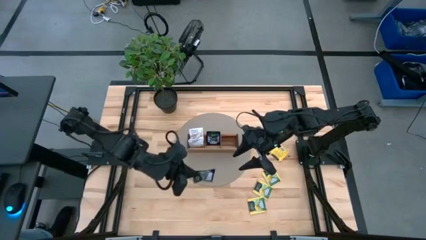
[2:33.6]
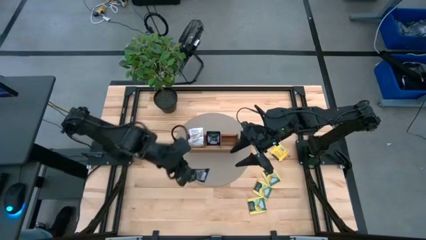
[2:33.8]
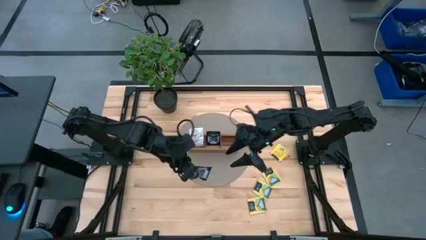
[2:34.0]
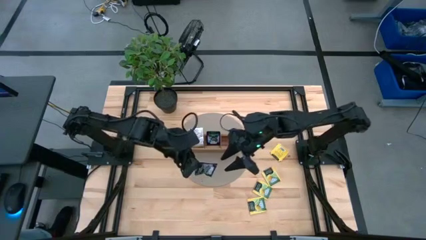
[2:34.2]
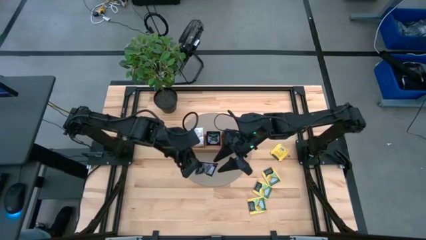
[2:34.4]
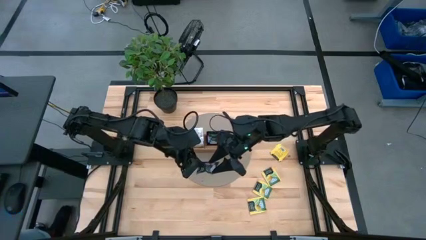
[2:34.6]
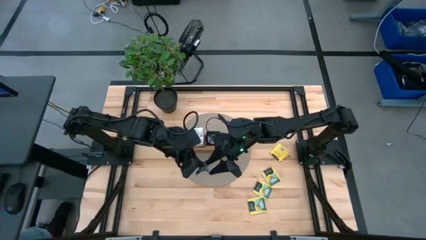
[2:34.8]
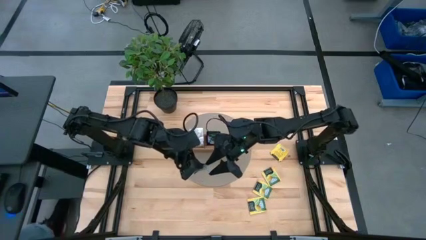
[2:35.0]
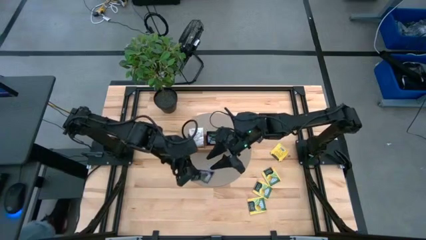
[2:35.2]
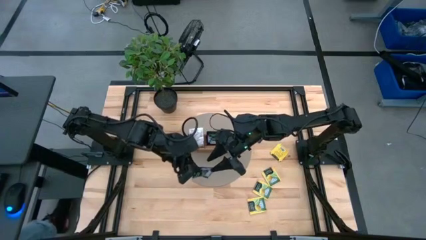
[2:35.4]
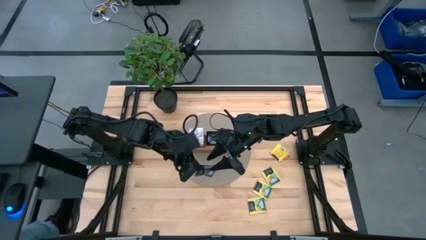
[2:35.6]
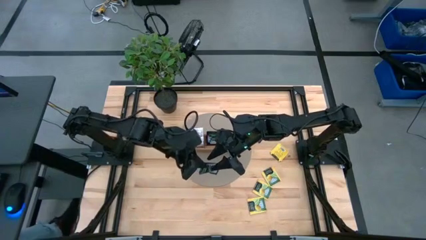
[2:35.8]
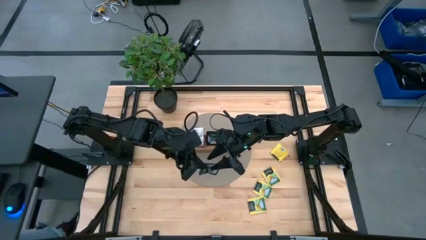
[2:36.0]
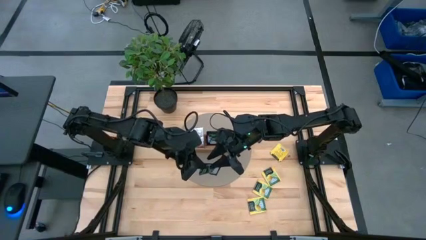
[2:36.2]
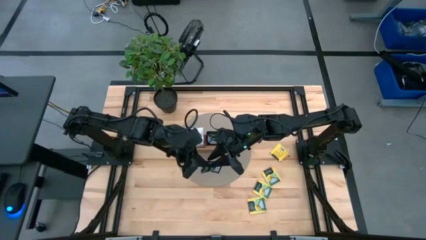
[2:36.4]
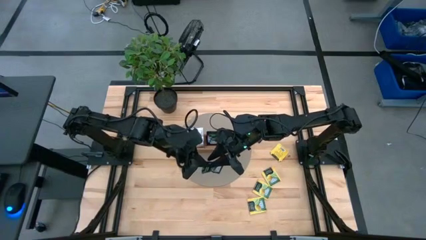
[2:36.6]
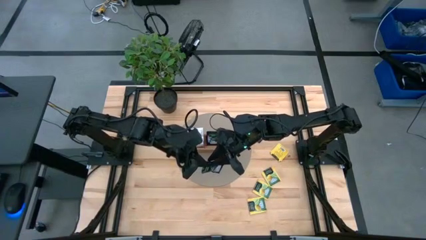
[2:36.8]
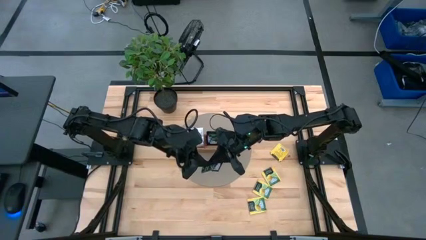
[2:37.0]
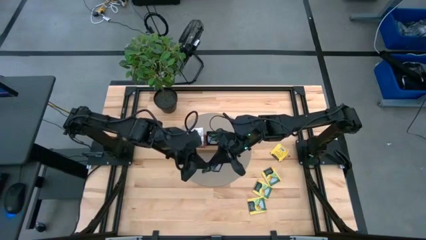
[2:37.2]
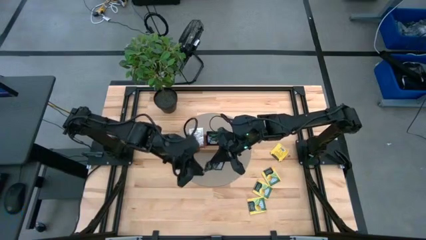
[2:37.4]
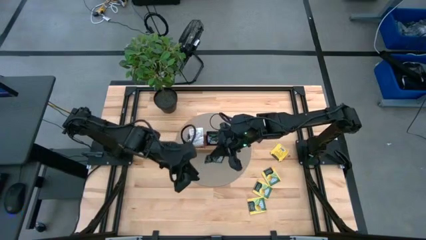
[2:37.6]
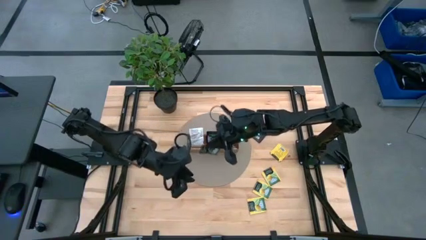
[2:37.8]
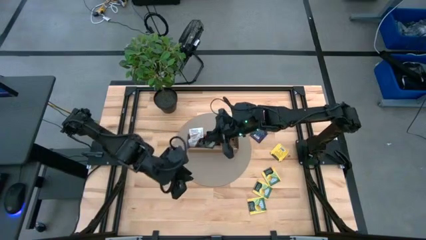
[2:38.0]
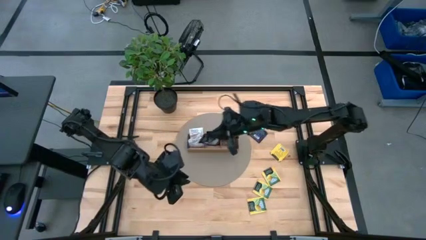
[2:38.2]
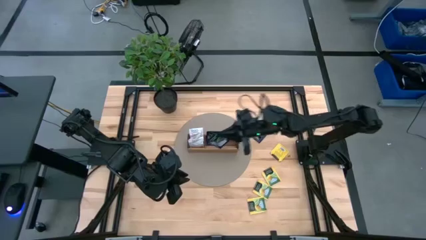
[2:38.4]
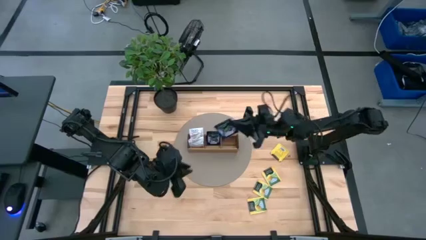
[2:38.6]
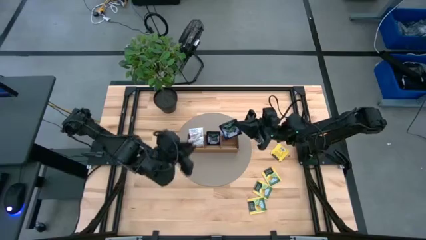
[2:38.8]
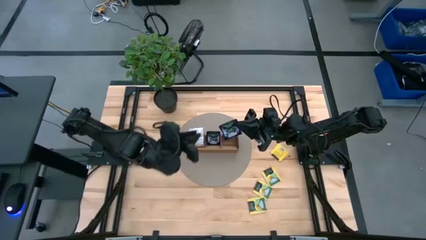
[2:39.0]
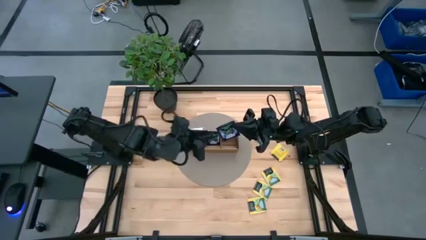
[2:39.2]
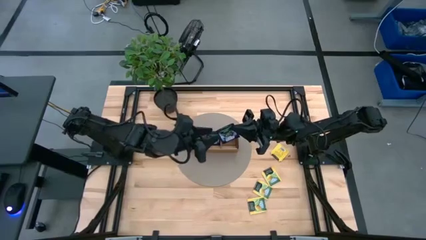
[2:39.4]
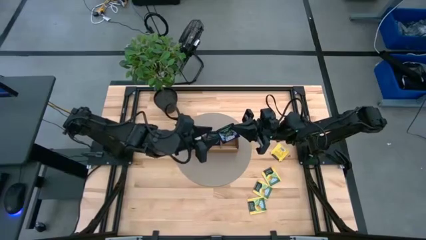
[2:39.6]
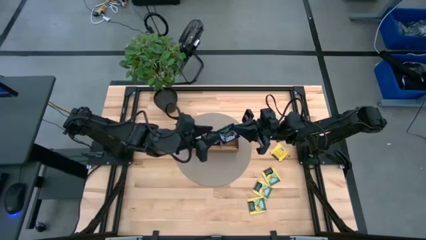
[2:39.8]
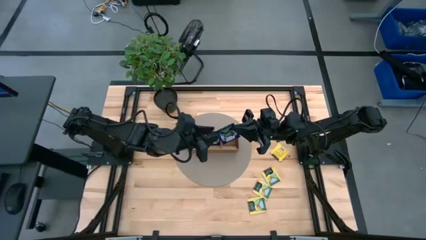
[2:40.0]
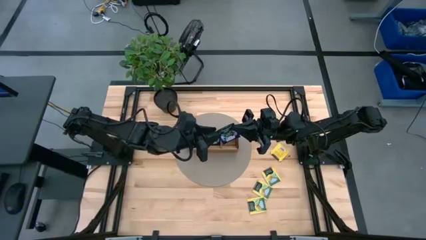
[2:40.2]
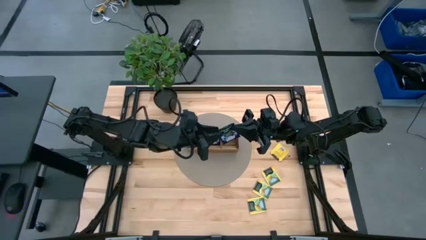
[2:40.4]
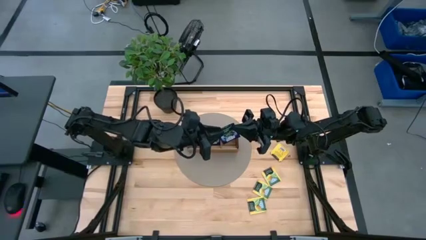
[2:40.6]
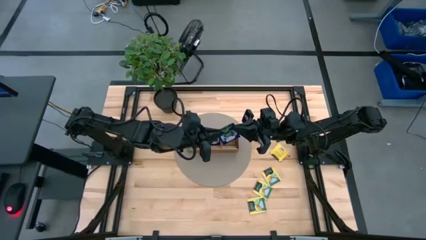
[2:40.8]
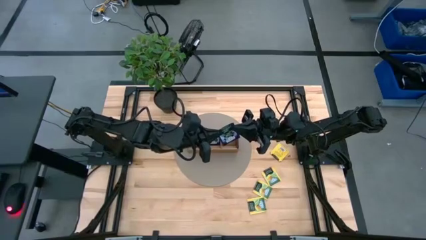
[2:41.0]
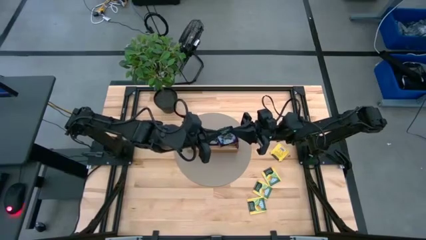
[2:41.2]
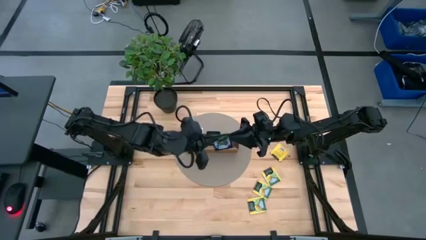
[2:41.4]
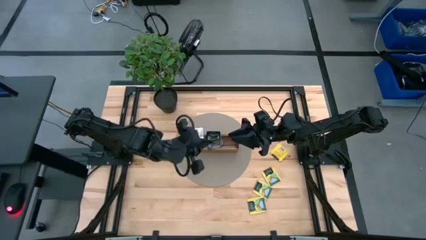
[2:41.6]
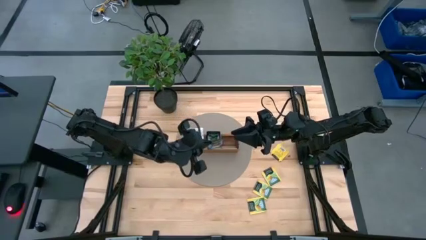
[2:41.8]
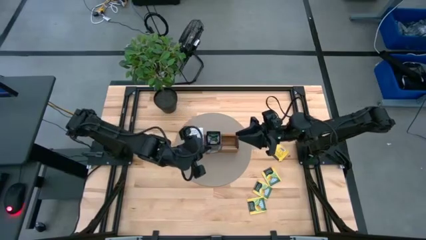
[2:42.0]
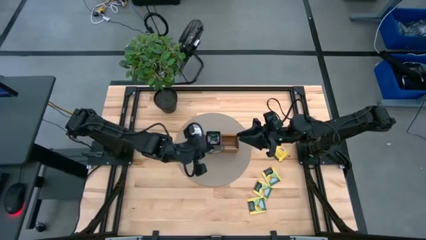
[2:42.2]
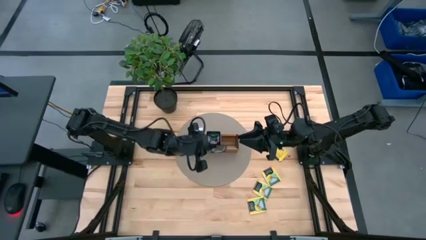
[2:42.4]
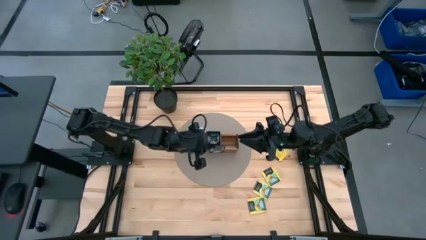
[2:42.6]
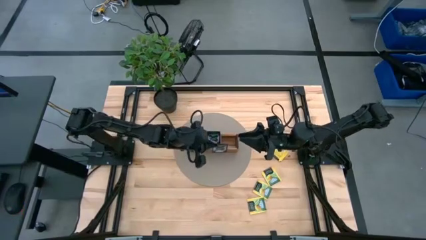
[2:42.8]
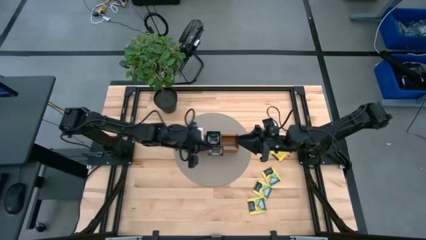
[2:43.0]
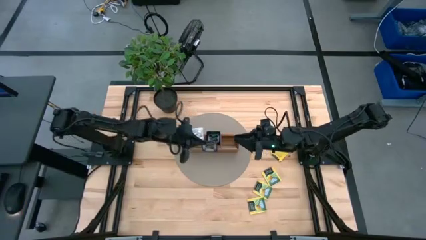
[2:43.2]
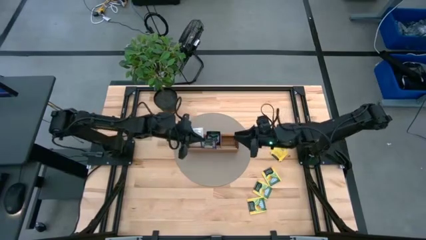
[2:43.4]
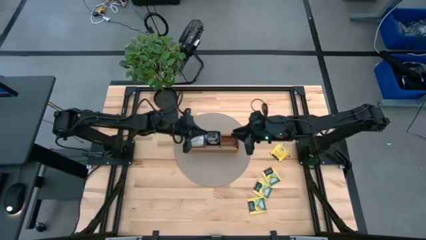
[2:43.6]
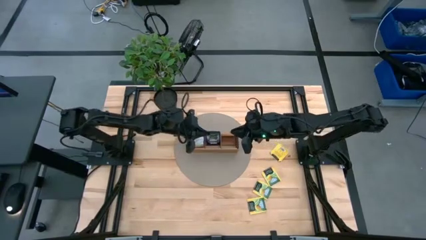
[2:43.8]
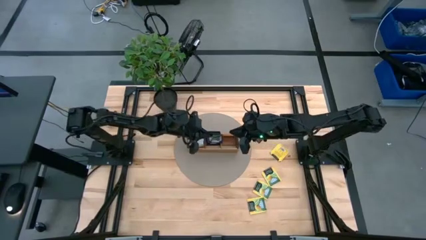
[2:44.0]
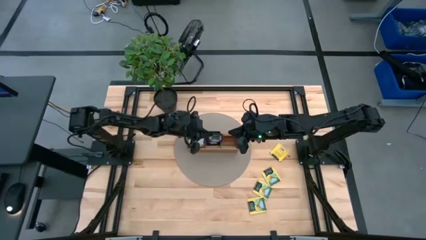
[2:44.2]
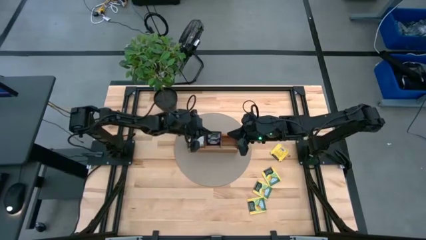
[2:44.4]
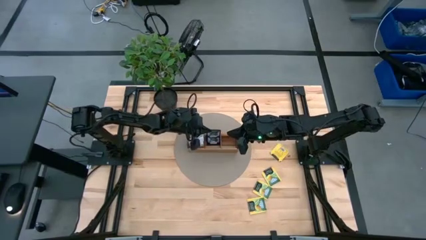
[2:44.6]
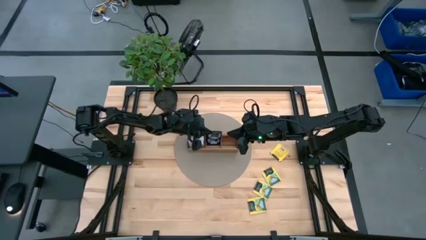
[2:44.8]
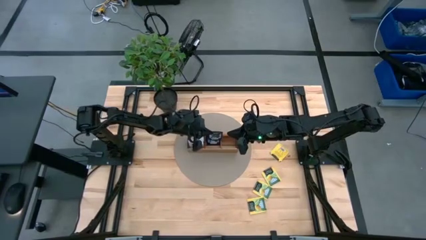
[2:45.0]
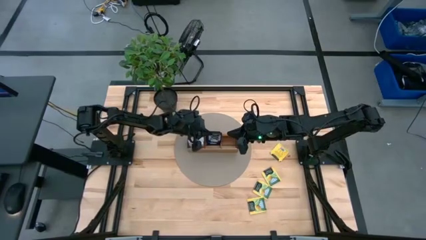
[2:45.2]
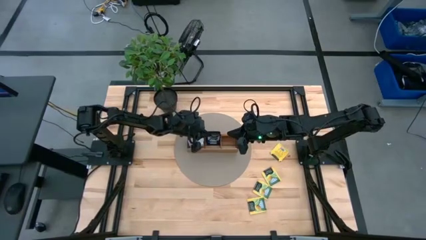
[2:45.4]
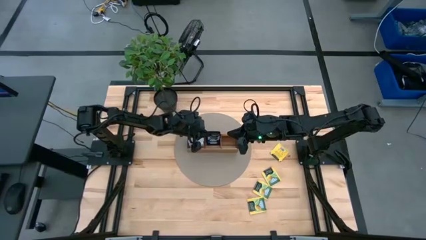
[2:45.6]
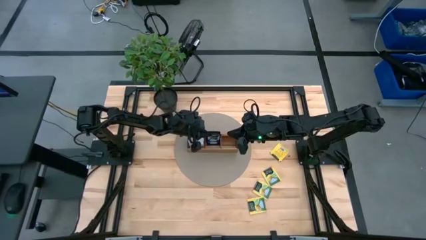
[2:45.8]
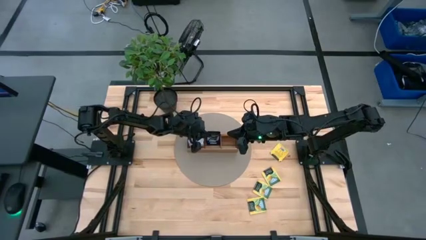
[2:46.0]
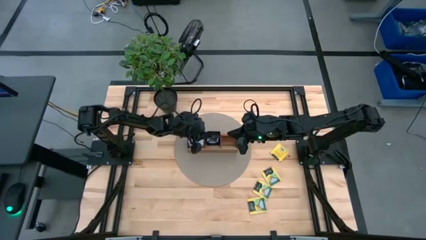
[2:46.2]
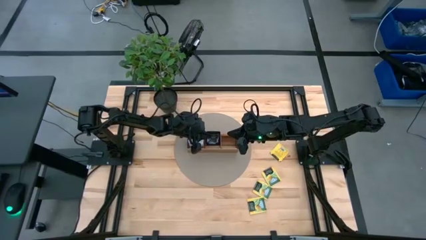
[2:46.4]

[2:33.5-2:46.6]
Task: Pick & Place Tea
Put the blue tea bag into the middle section of the wooden organizer

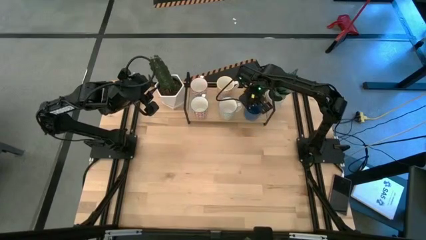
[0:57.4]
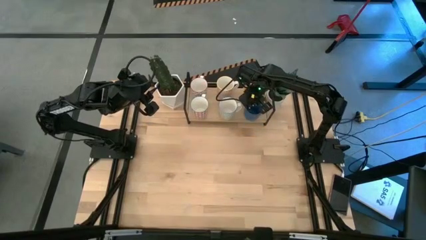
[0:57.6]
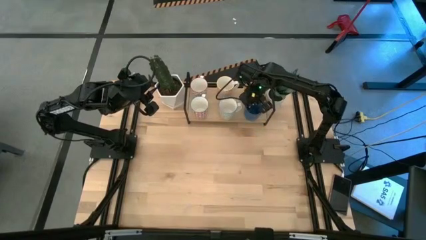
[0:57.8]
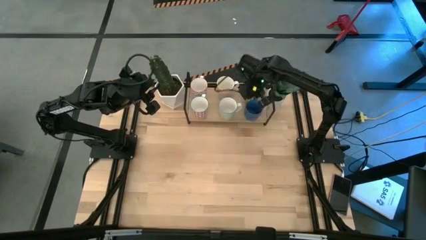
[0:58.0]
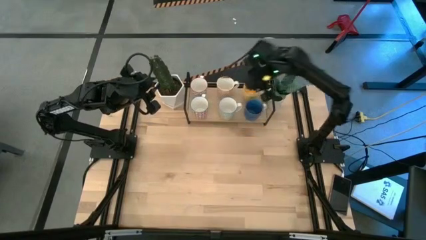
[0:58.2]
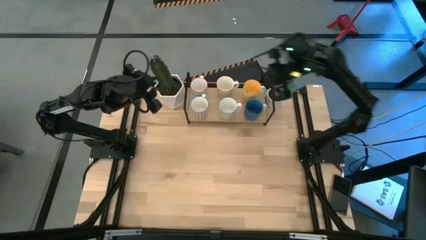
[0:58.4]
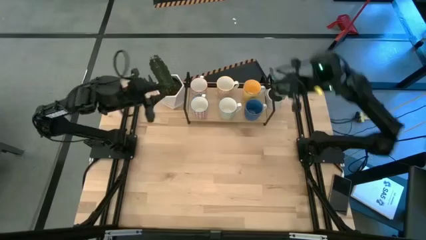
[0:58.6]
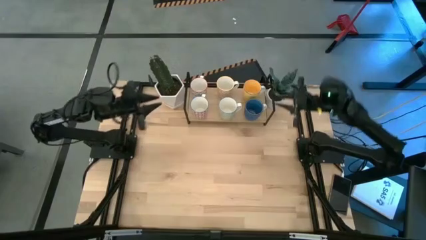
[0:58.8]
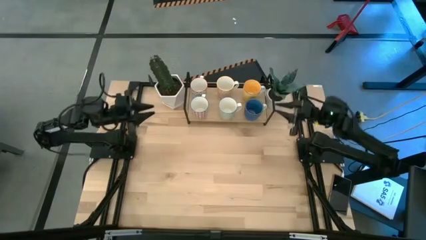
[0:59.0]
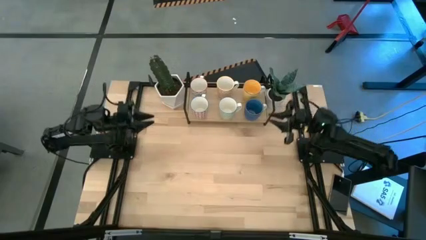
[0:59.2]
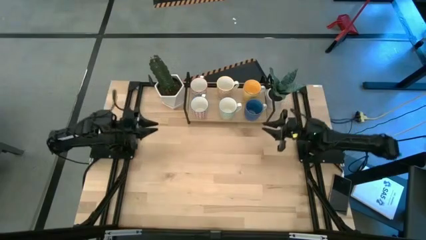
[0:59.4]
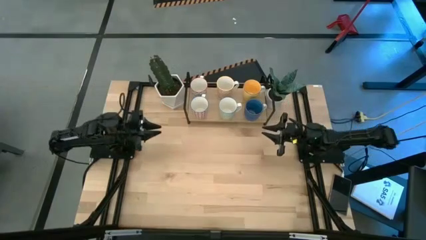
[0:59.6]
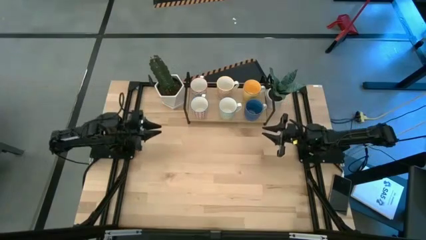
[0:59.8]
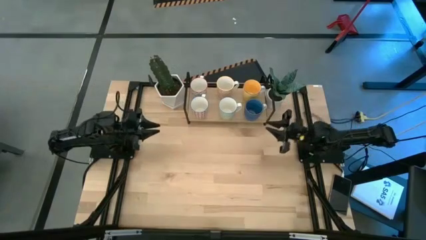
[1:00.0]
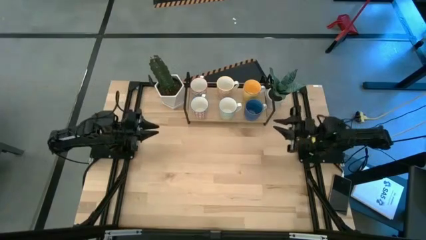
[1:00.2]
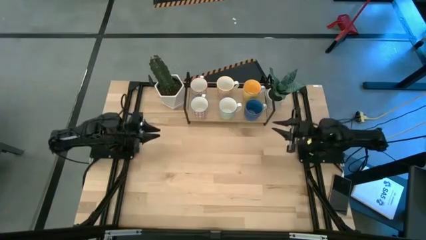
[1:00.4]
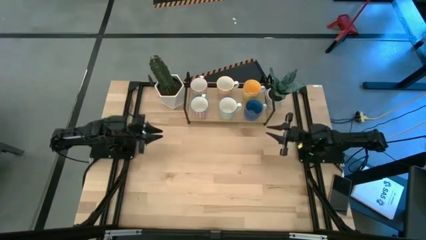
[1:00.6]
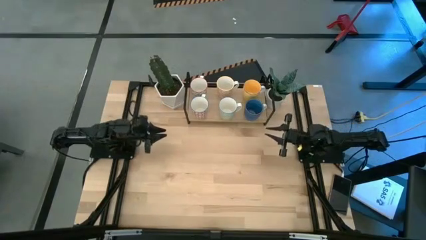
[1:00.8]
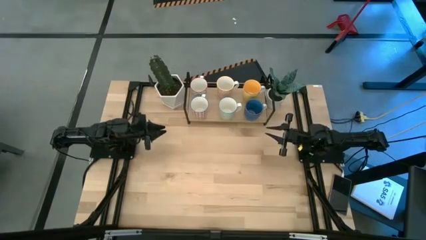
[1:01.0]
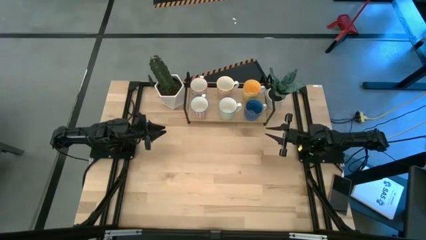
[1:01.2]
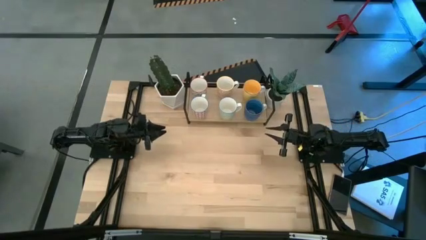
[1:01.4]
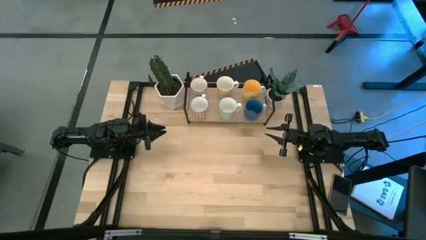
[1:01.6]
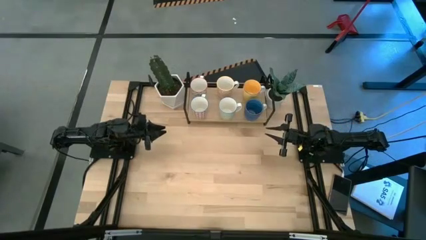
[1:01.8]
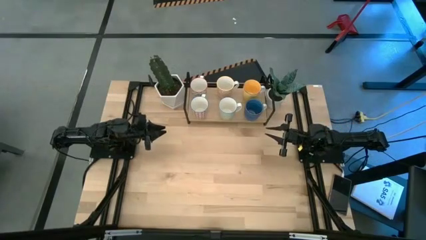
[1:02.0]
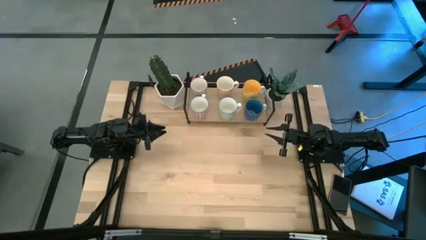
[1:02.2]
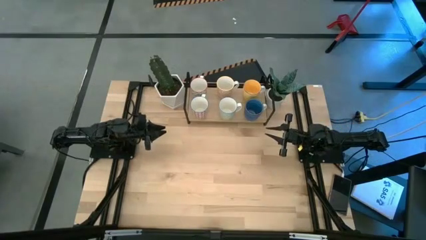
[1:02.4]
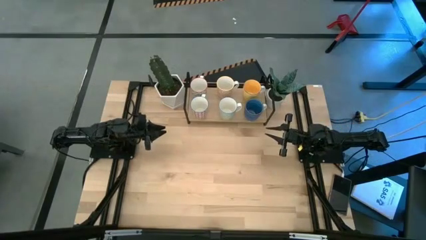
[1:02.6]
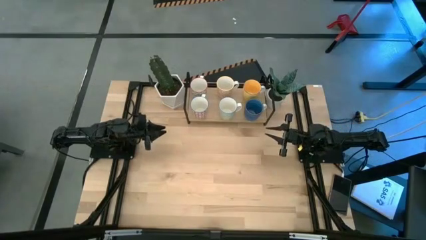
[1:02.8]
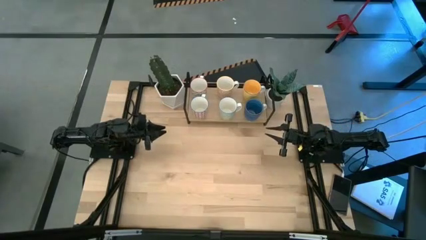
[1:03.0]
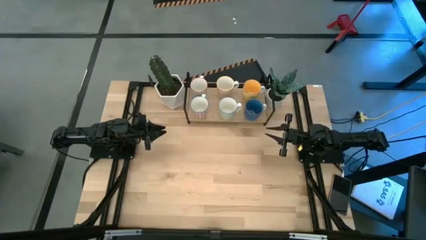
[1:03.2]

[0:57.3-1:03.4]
Task: Place coffee mugs
Return to Home Position
